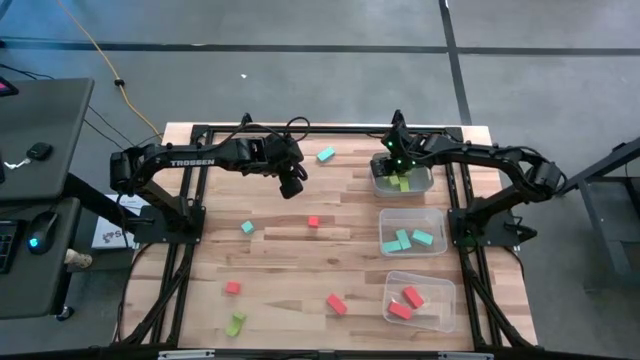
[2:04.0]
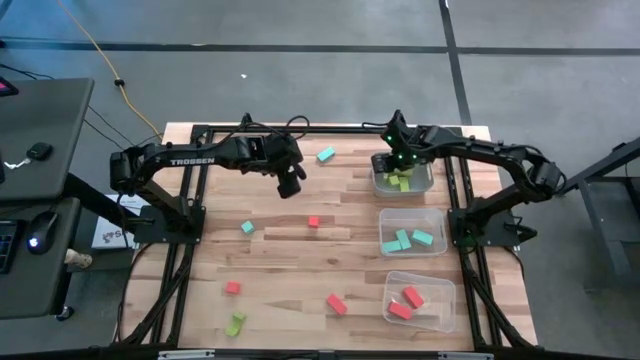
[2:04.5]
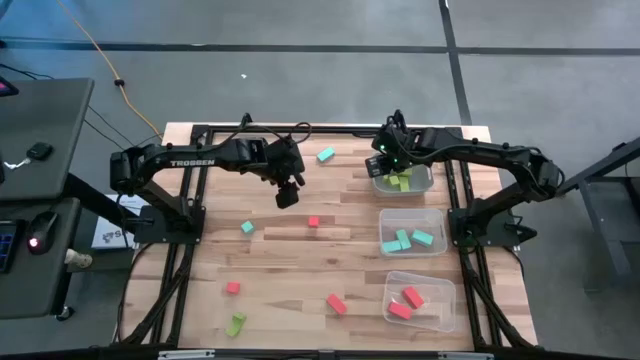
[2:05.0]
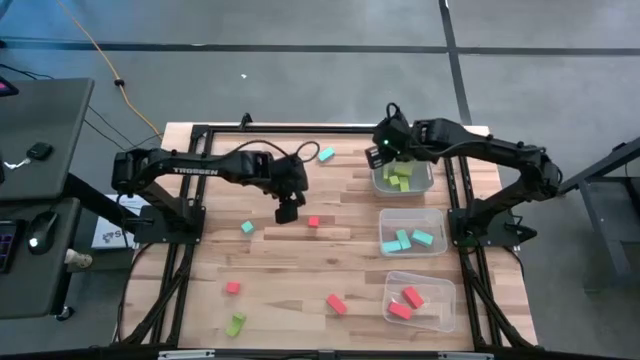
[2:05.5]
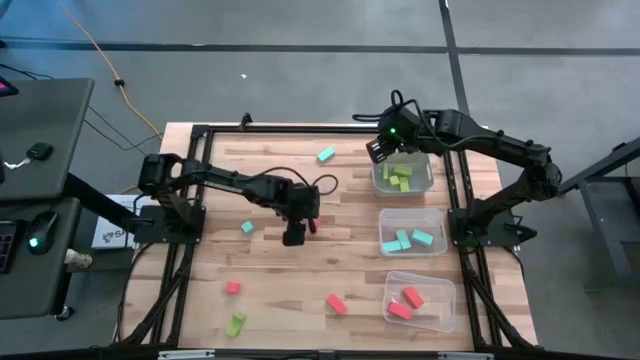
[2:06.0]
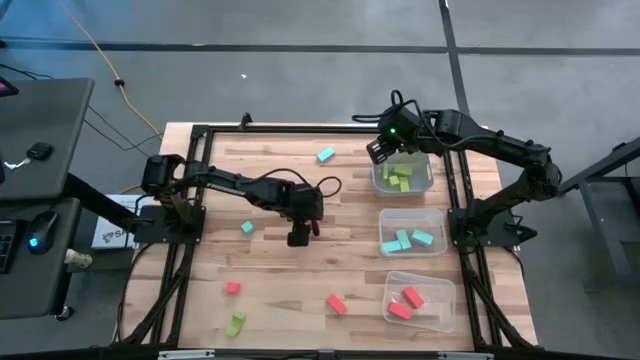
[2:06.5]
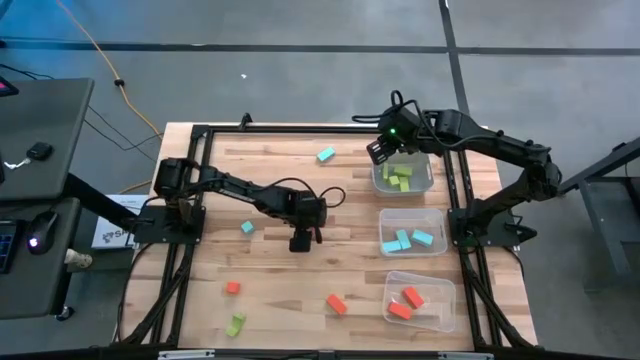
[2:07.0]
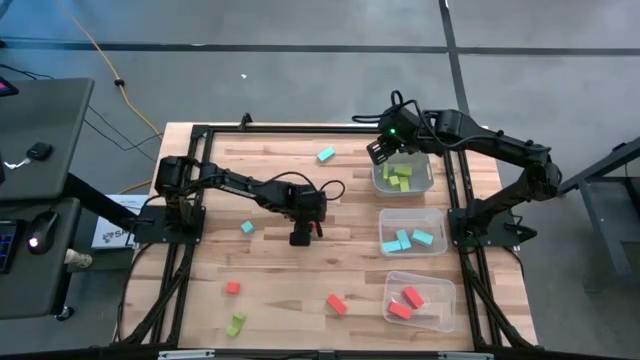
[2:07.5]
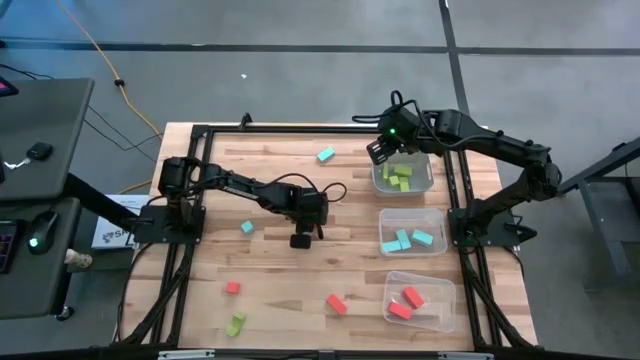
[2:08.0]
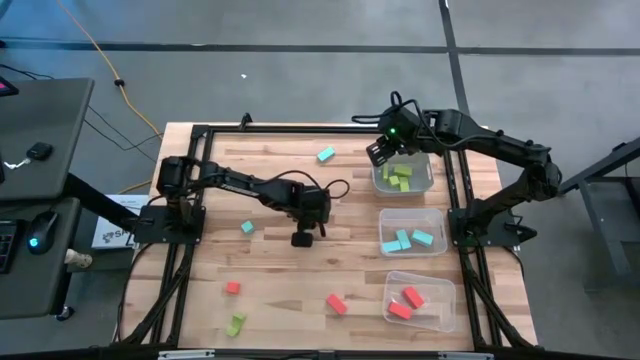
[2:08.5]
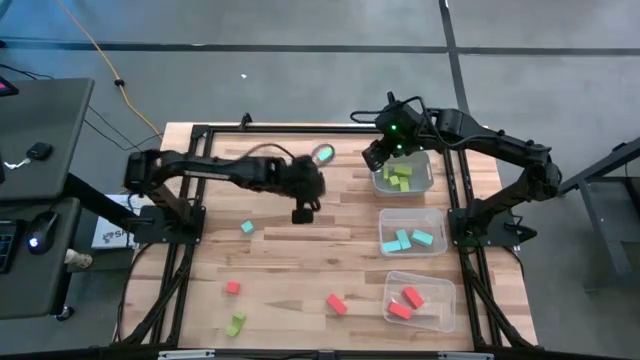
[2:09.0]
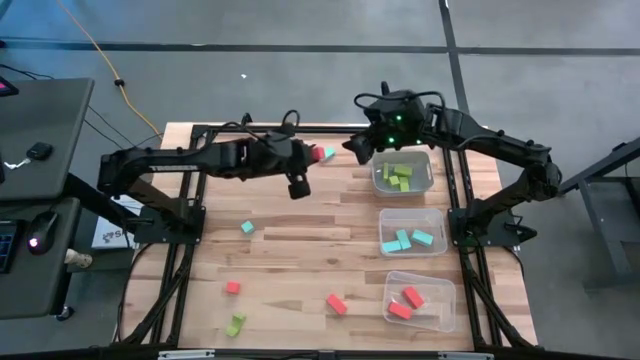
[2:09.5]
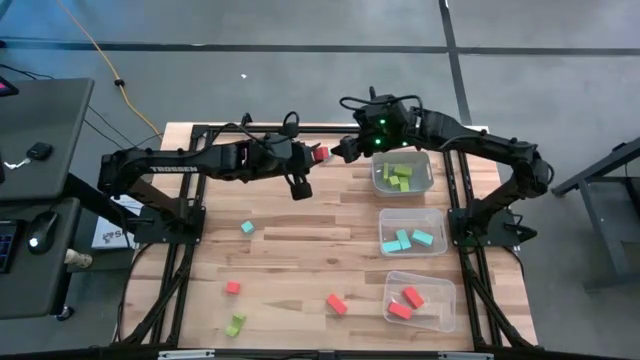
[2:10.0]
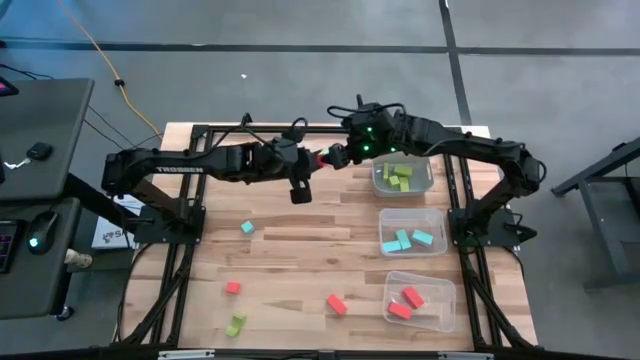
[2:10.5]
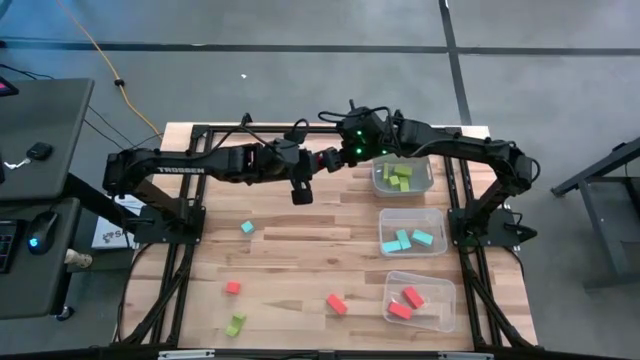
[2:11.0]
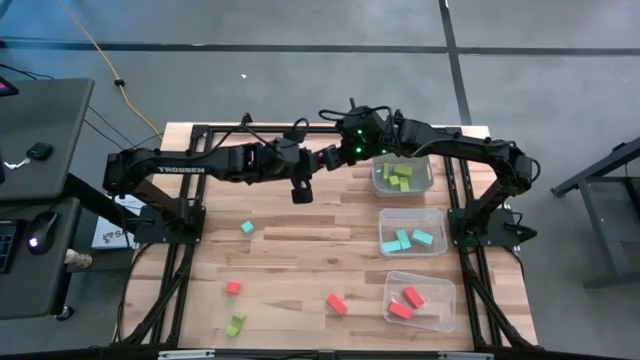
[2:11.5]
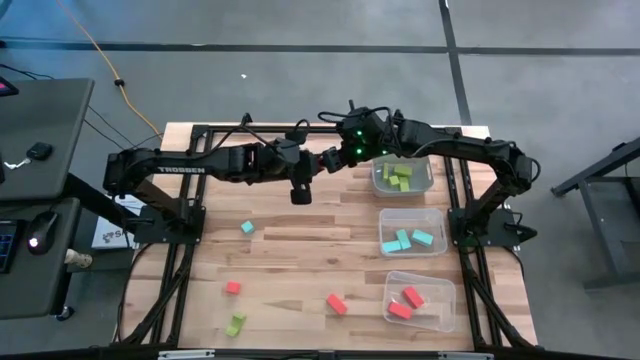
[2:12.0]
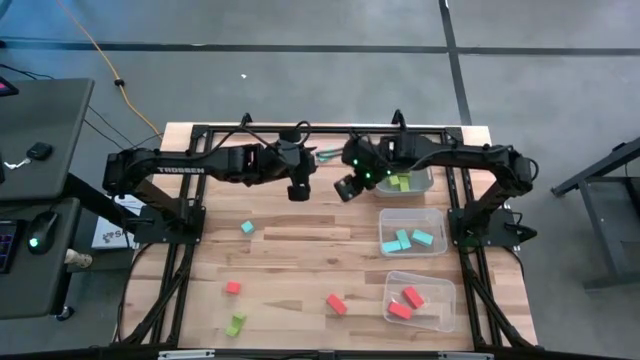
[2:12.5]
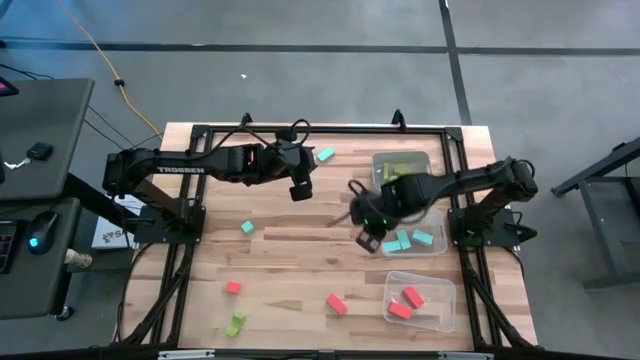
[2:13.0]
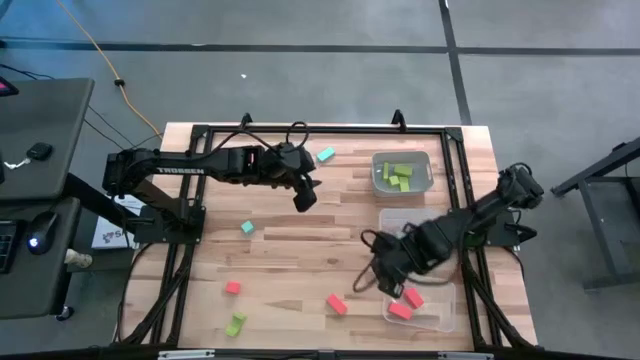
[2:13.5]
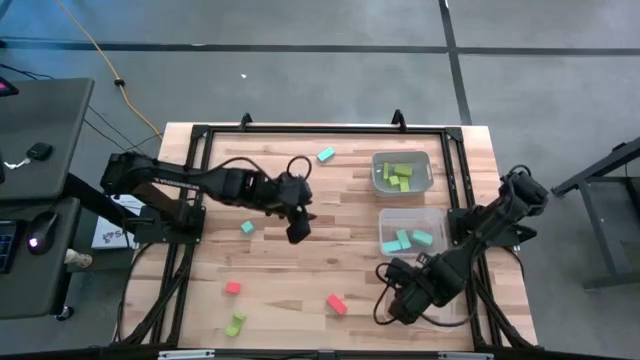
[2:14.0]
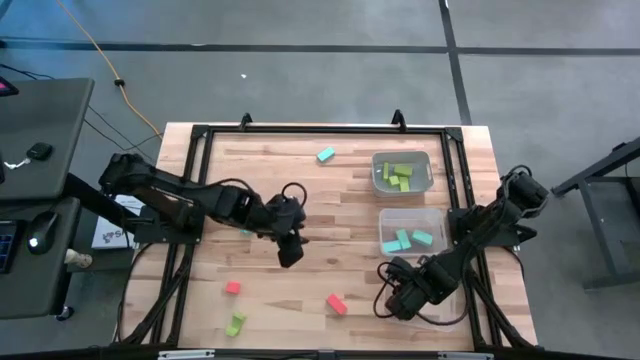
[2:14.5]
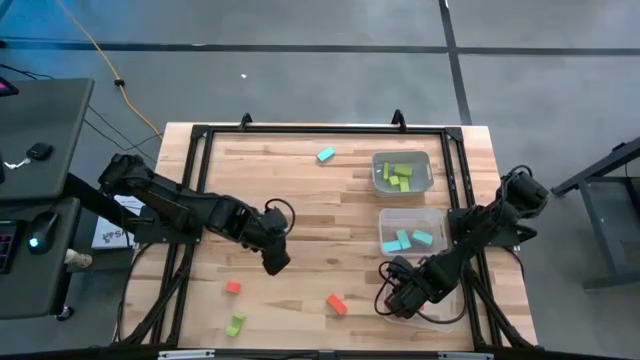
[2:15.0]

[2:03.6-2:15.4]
Task: Sort & place blocks by color
Put the orange block into the bottom transparent bin

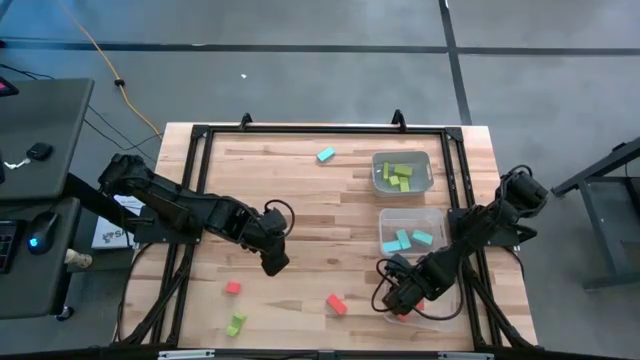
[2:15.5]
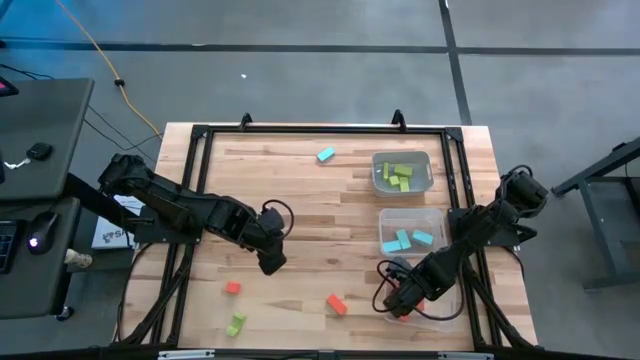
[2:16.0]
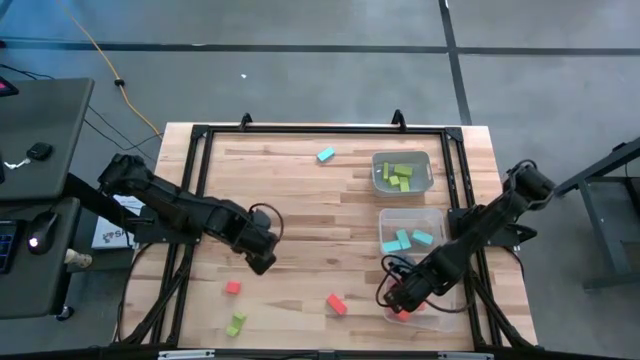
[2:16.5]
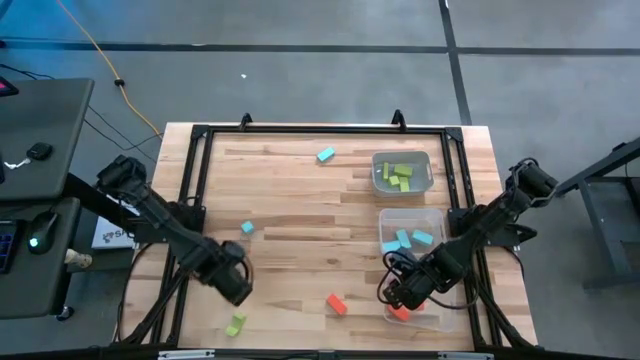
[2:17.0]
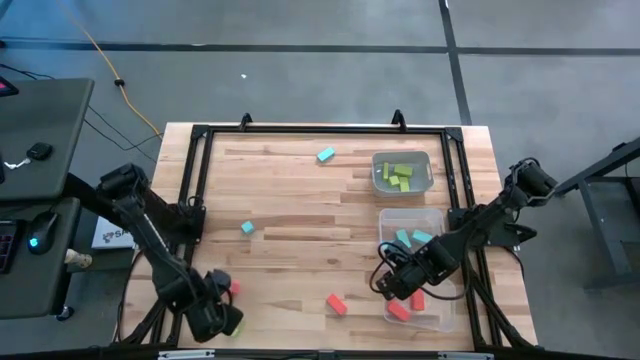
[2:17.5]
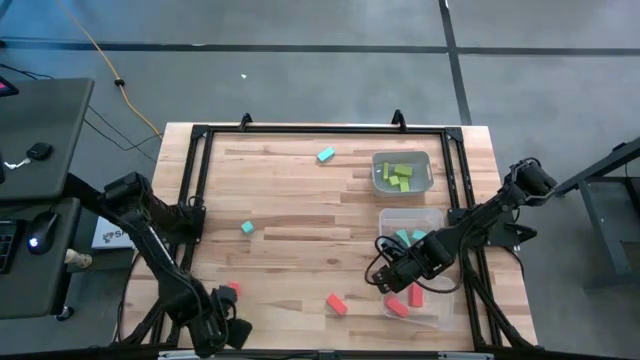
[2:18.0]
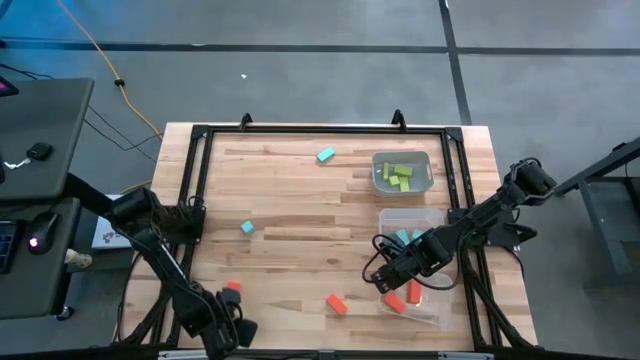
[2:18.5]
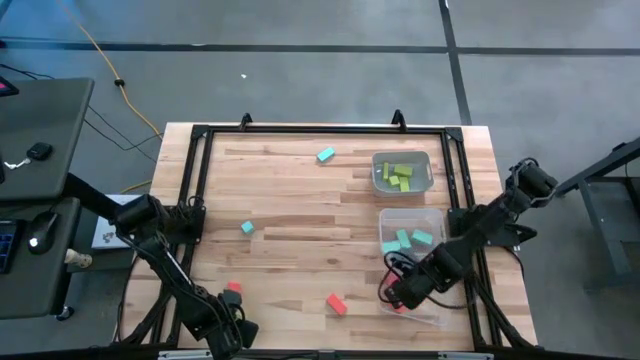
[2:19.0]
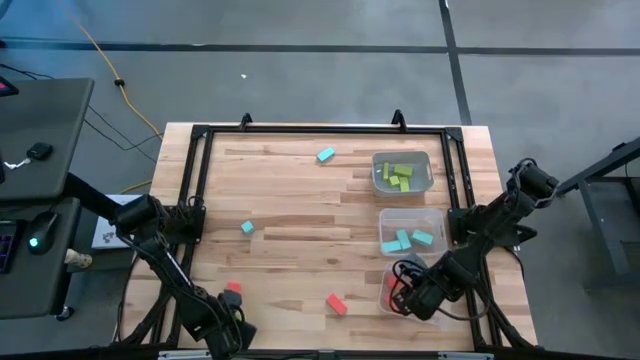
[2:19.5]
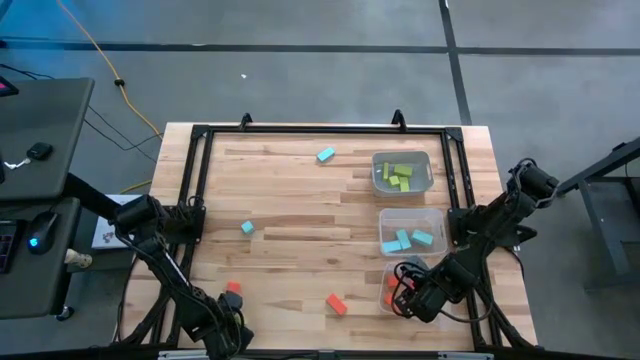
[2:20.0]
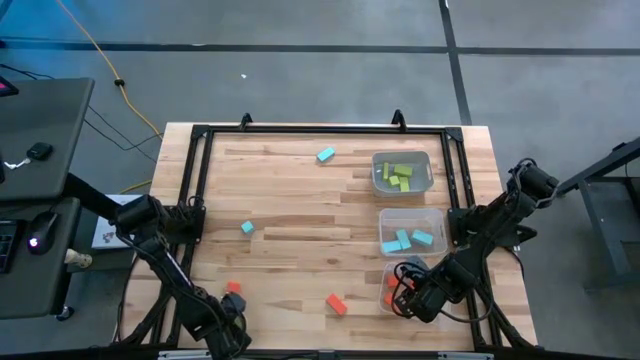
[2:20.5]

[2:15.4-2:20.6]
Put the light green arch block into the gray bin

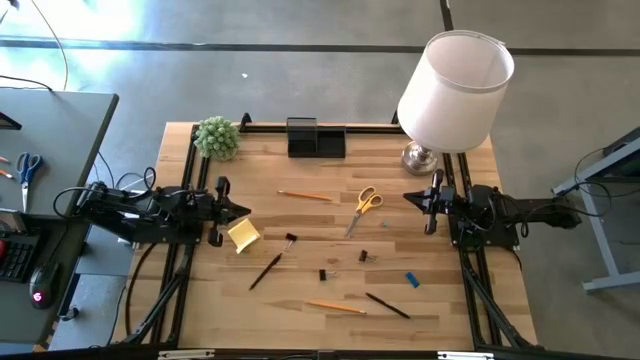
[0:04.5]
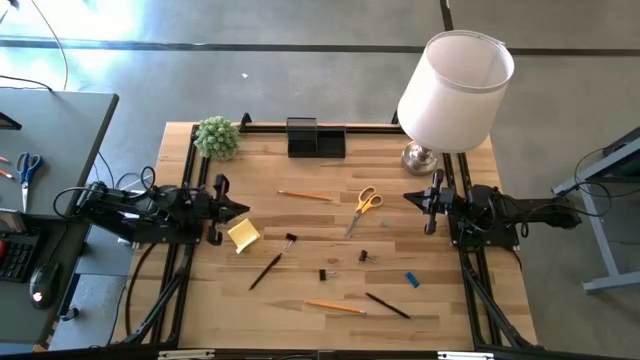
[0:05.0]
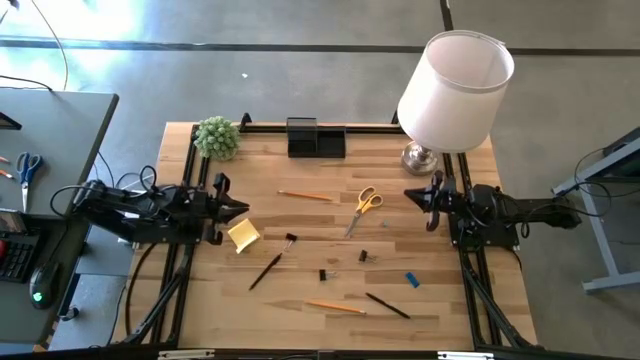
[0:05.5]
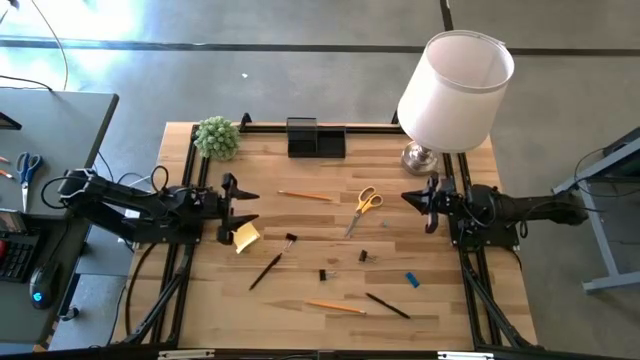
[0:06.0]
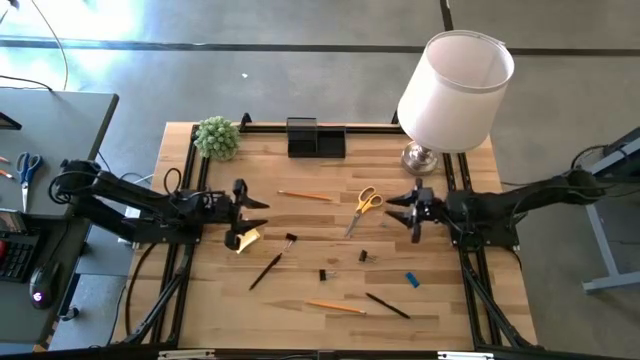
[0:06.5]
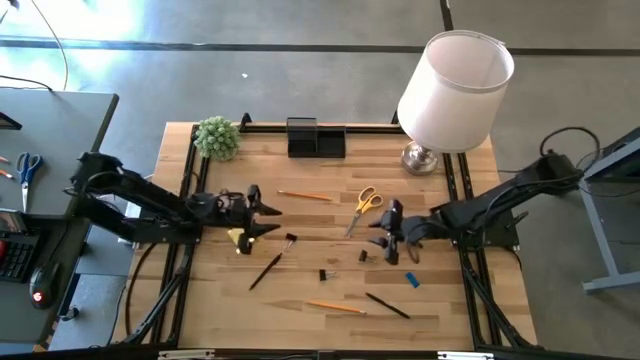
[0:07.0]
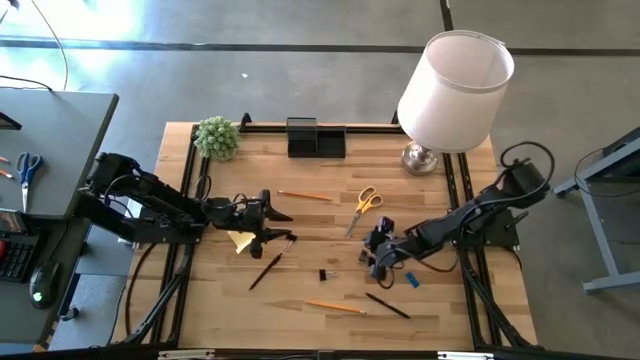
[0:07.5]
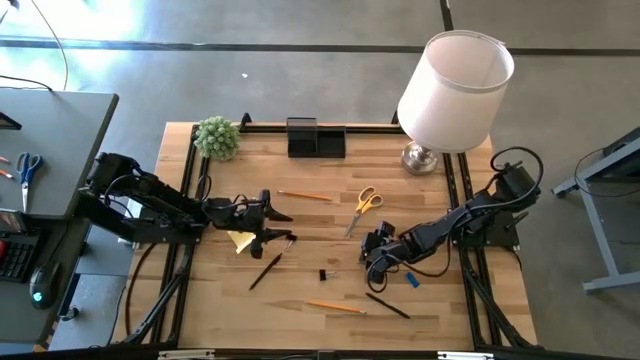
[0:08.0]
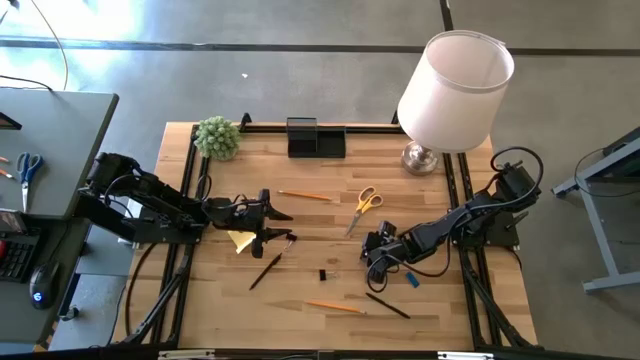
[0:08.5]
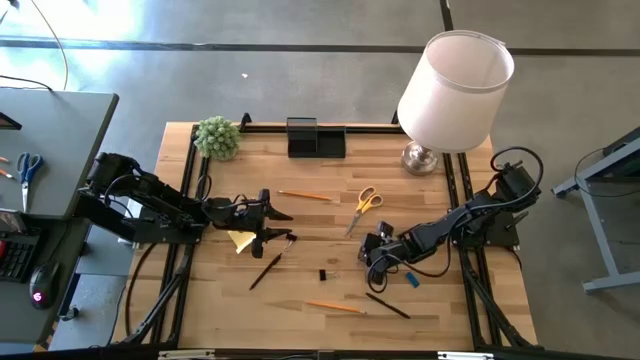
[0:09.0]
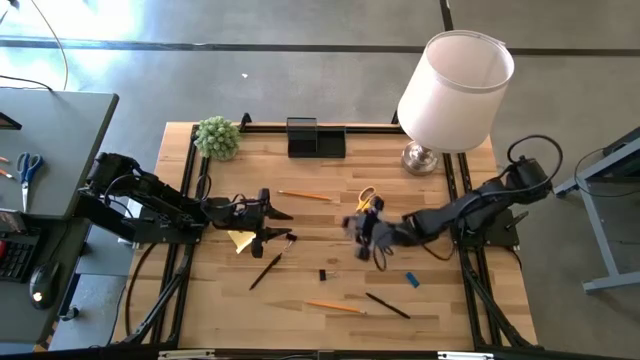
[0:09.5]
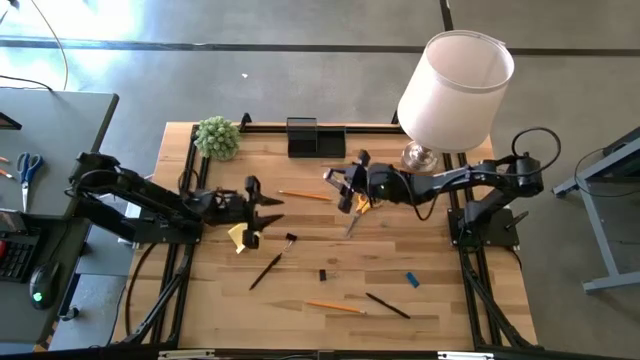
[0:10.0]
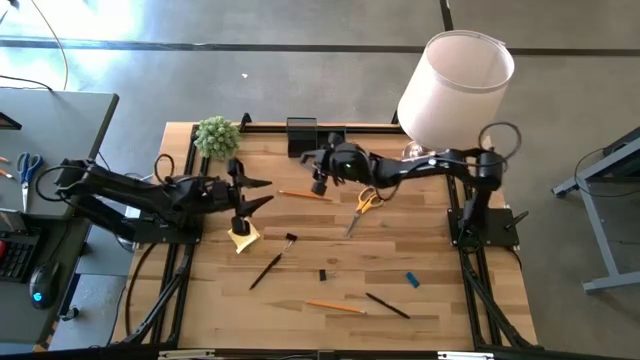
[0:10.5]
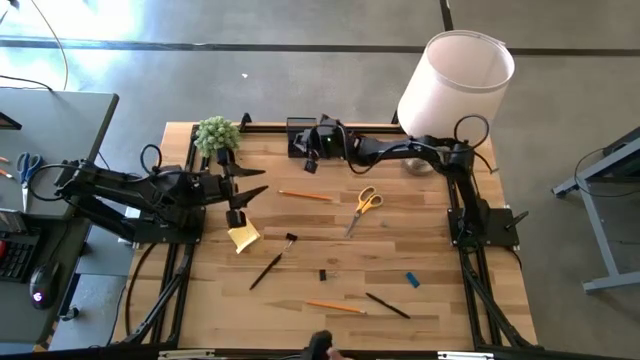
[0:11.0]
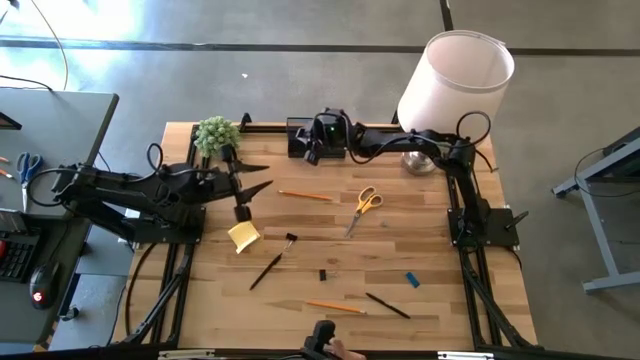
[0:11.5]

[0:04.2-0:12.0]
Task: Pick and place office supplies into organizer
Put the right black binder clip into the bottom left slot of the desk organizer
